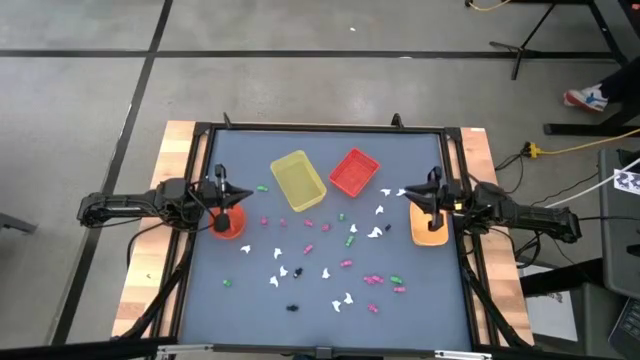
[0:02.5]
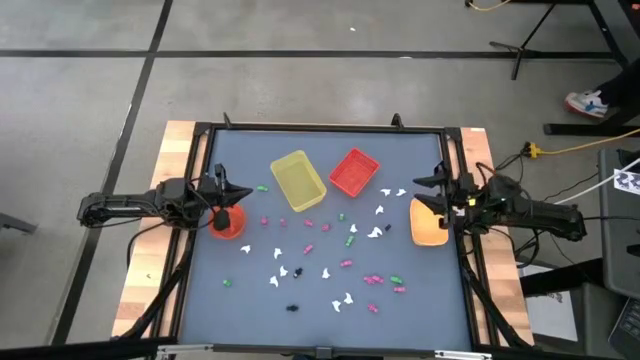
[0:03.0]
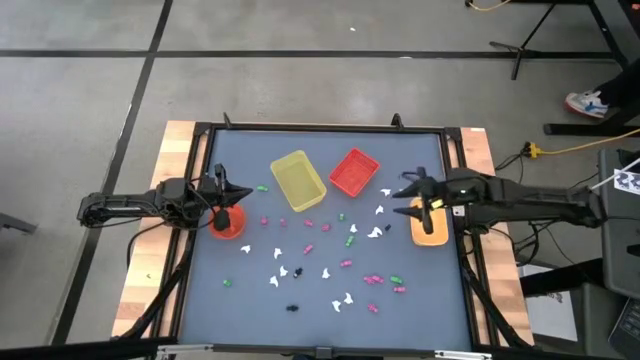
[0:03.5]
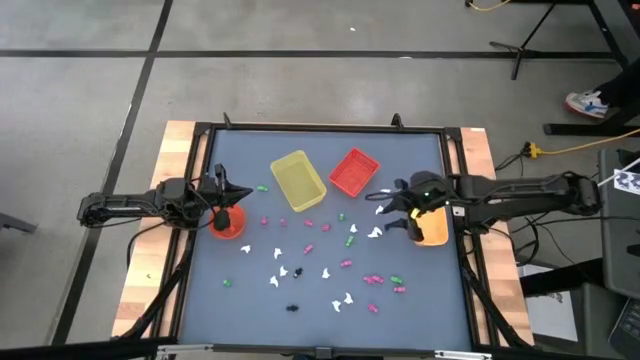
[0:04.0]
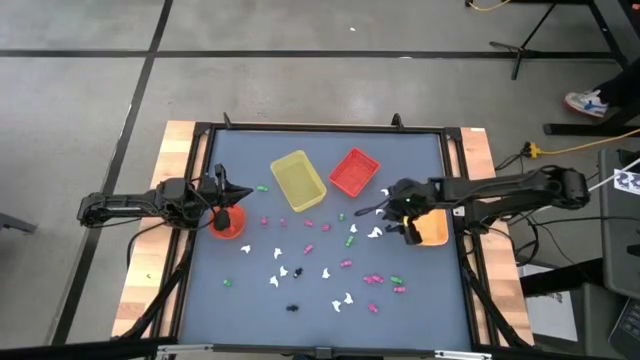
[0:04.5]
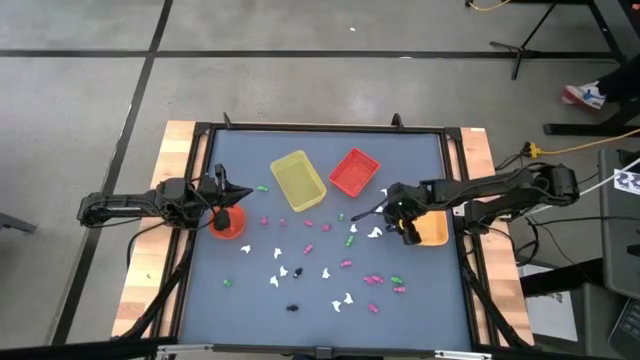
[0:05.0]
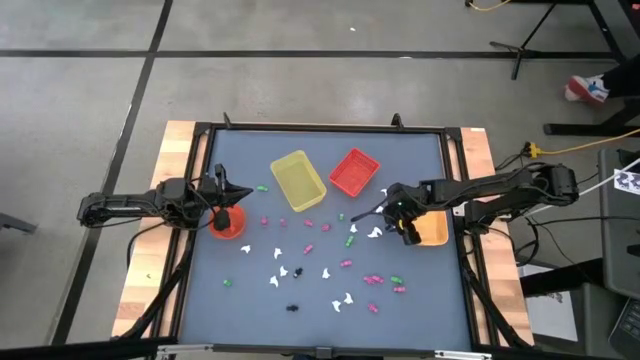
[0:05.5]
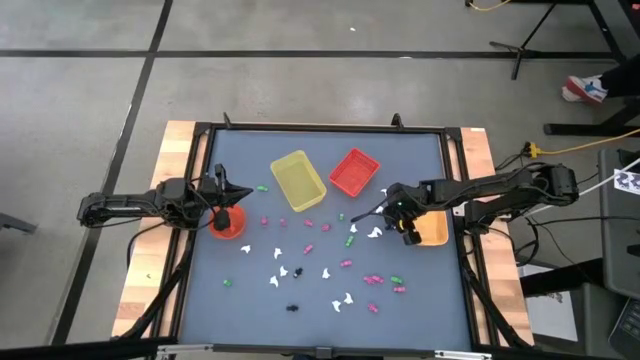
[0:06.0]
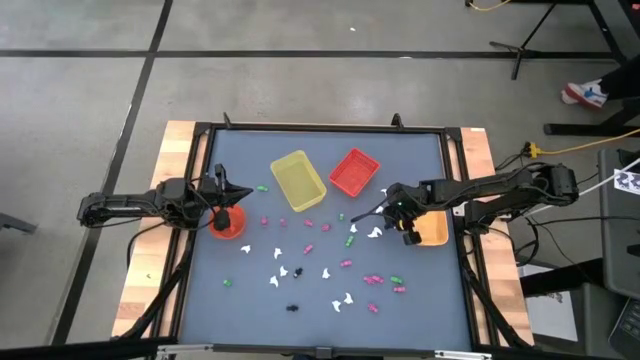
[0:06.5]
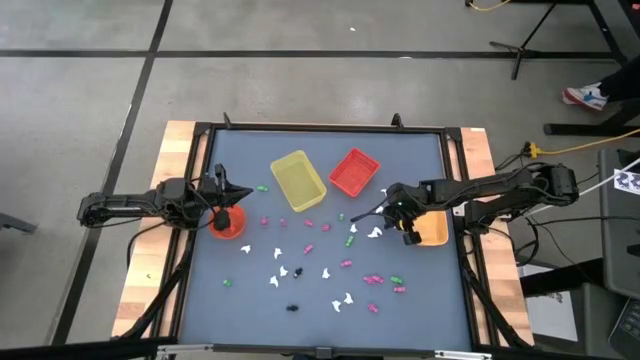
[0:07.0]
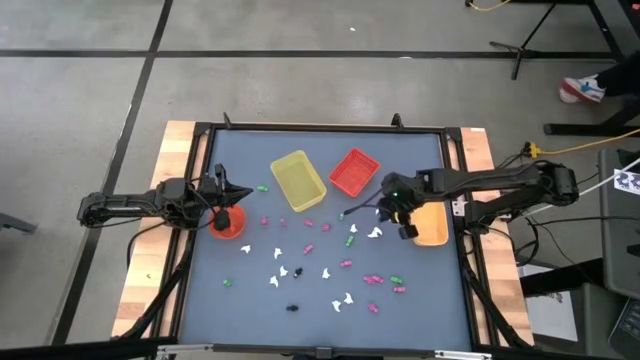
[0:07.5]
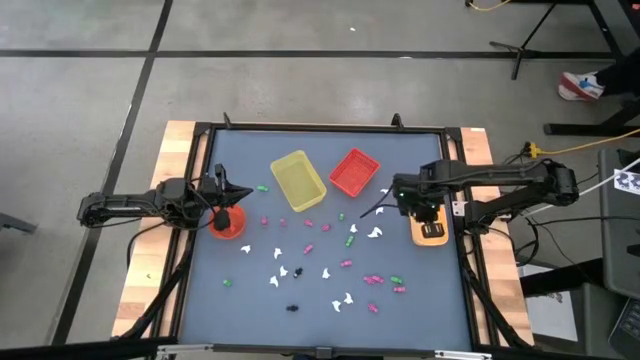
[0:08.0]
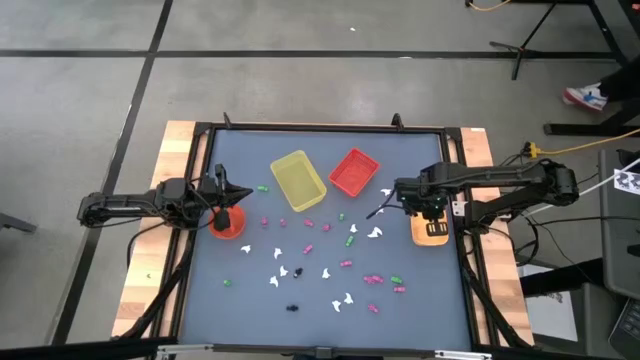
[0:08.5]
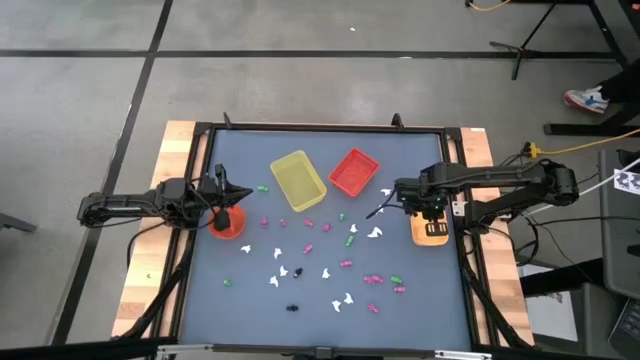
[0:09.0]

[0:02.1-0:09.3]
Task: Sort Halloween decoration
Put the black skeleton toy into the light orange bin

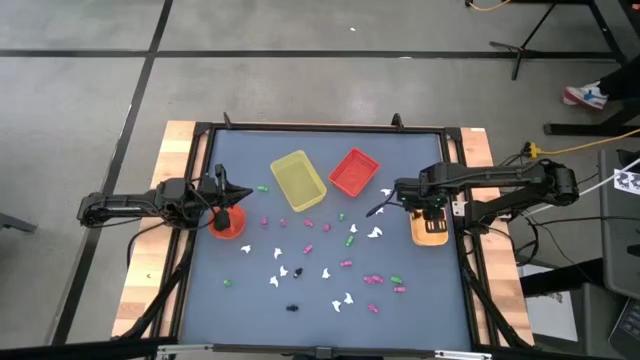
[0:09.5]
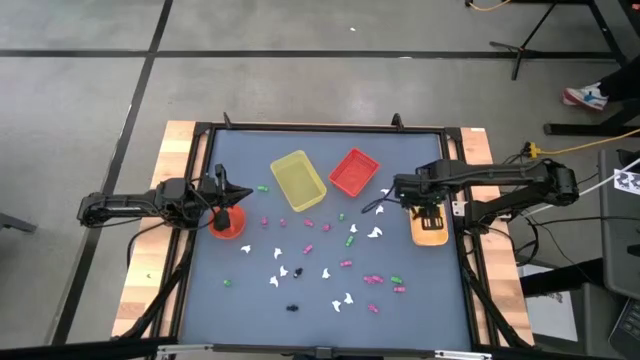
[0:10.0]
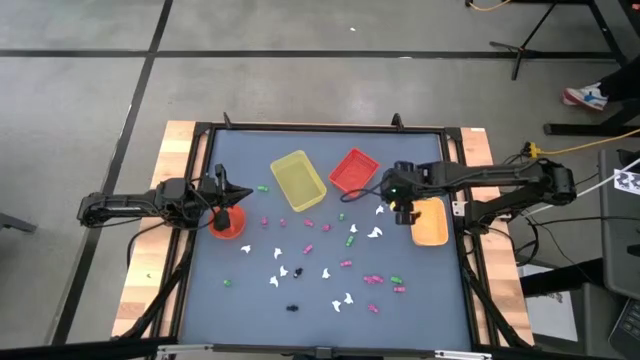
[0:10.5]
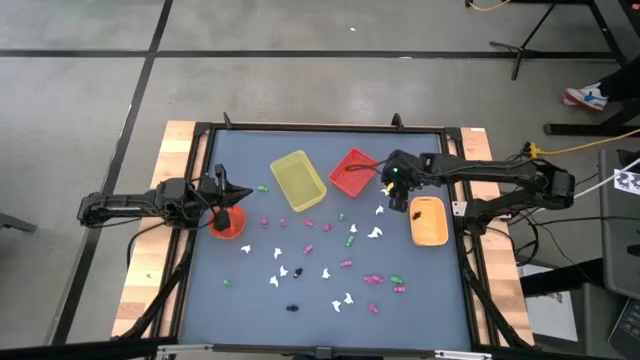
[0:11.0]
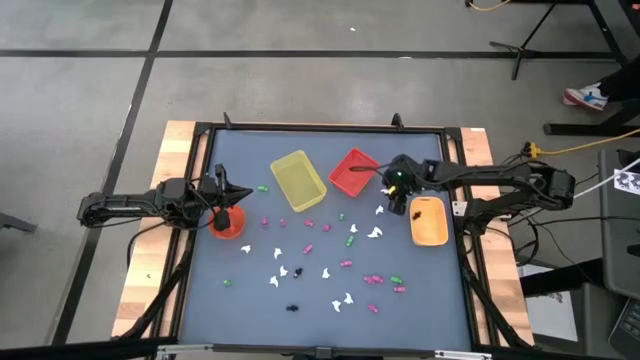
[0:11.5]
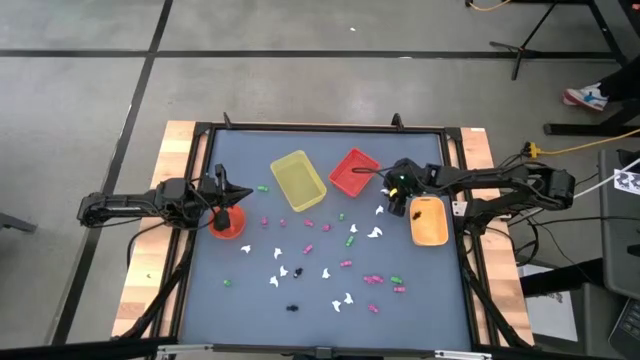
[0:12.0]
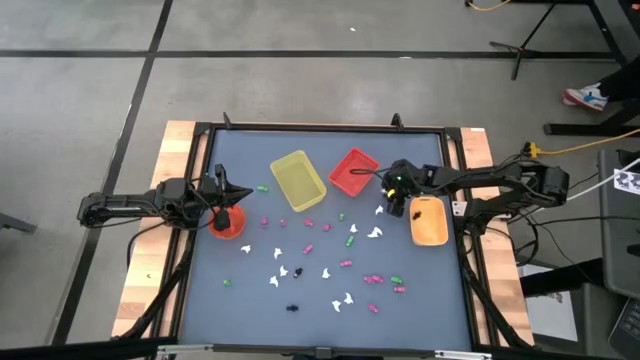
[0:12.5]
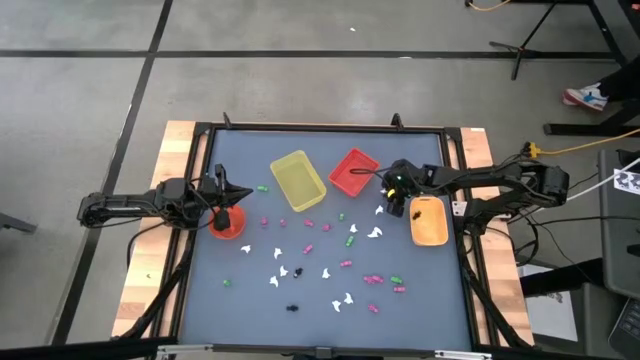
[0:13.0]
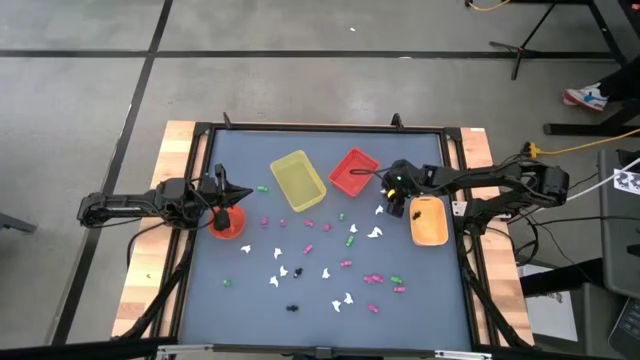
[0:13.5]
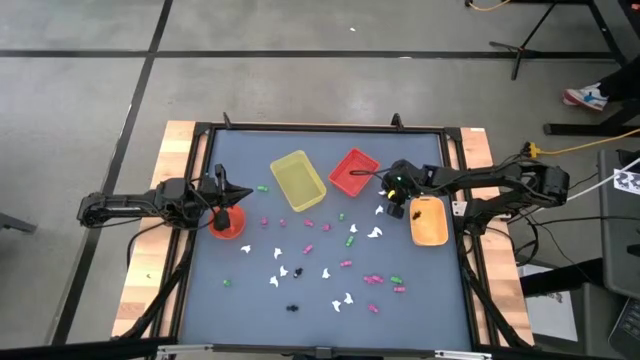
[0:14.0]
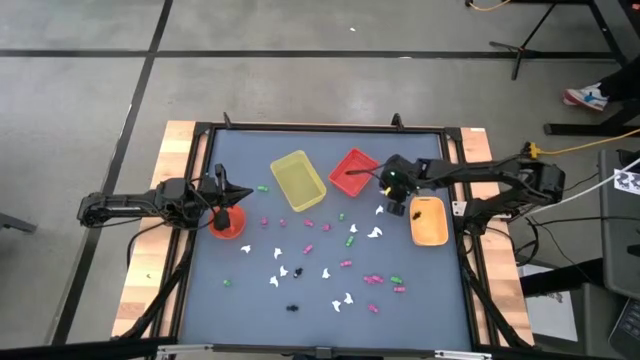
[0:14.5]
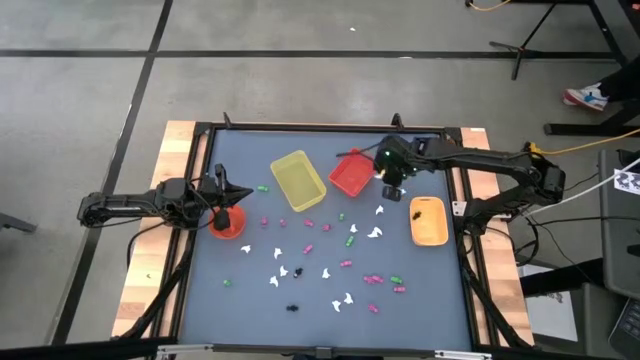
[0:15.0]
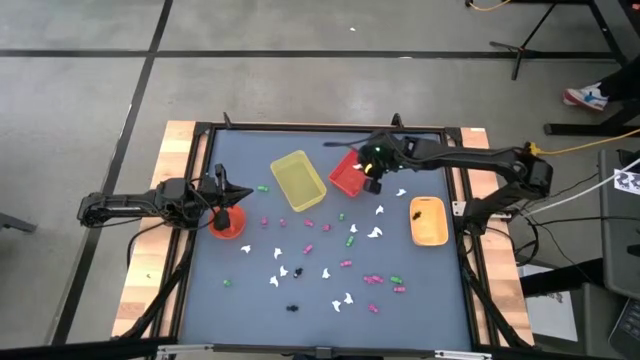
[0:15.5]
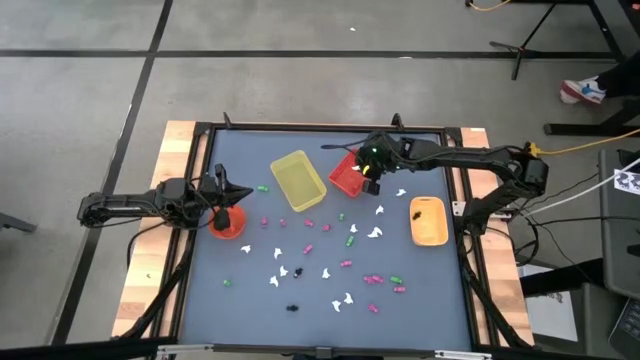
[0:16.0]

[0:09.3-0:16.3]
Put the white ghost toy into the red bin

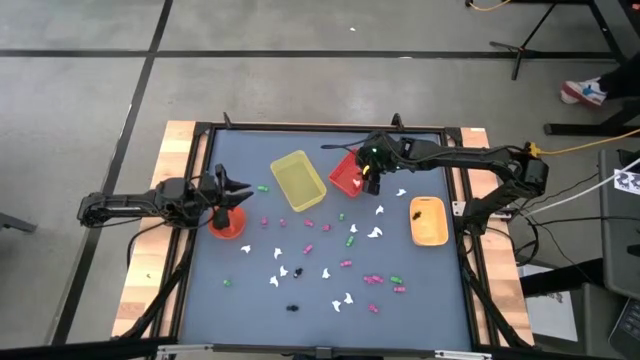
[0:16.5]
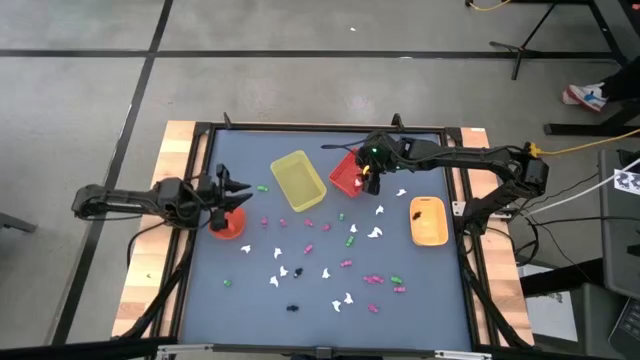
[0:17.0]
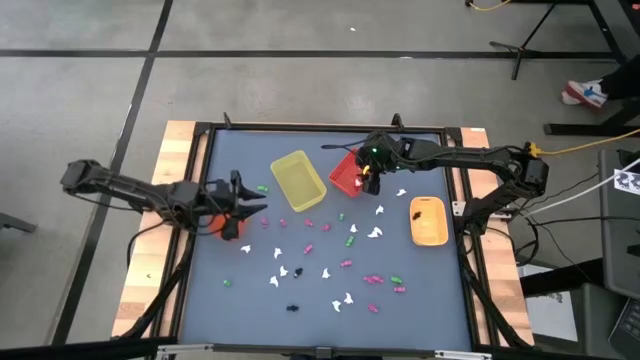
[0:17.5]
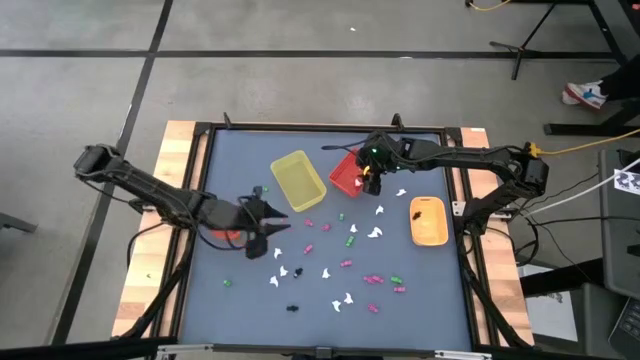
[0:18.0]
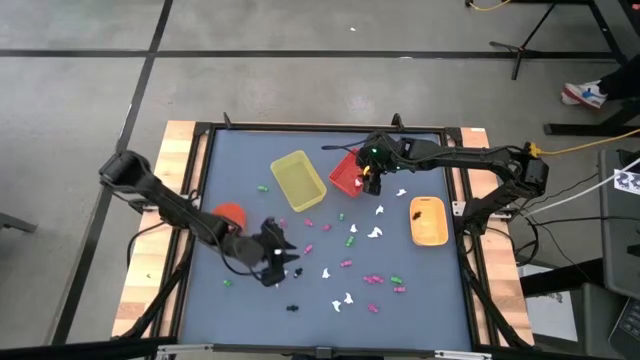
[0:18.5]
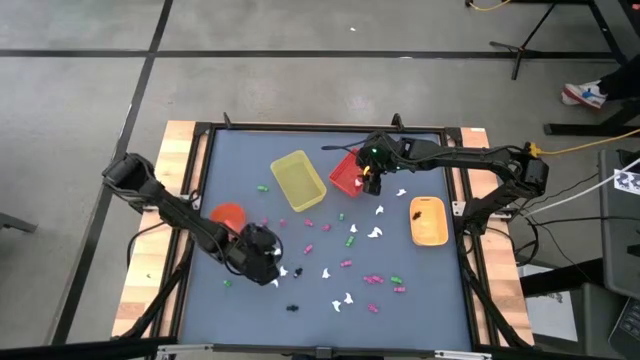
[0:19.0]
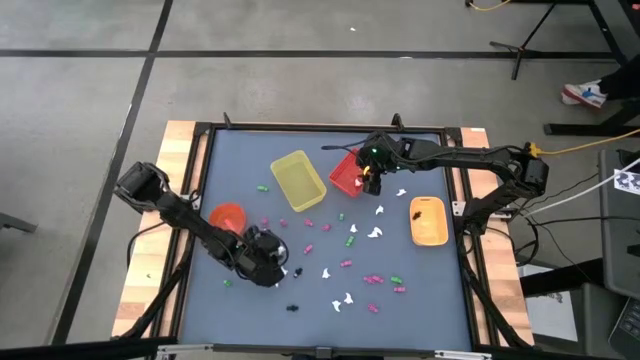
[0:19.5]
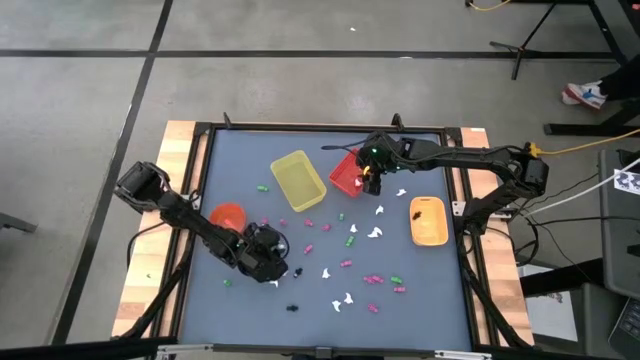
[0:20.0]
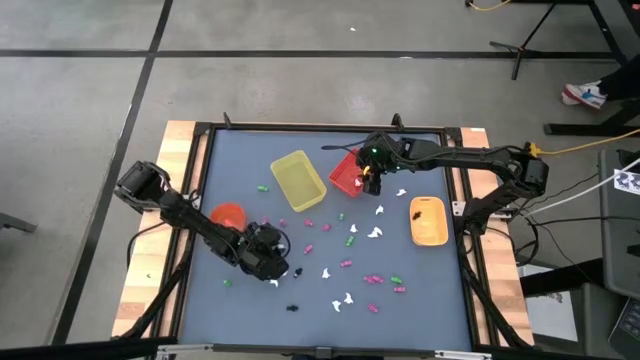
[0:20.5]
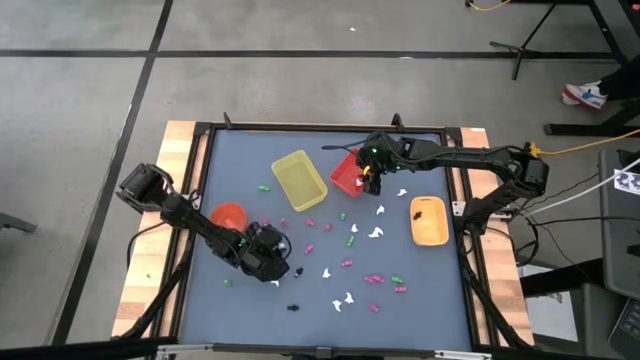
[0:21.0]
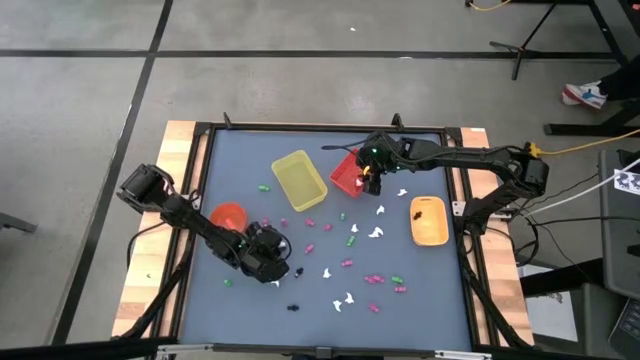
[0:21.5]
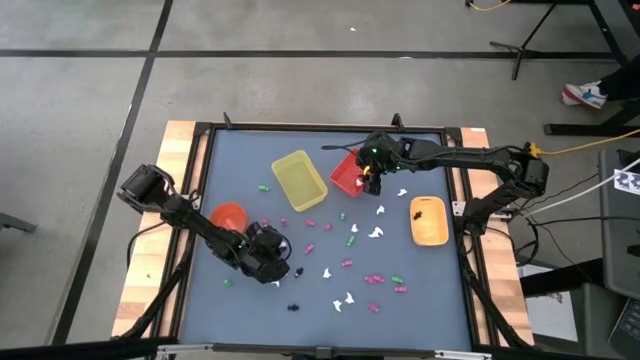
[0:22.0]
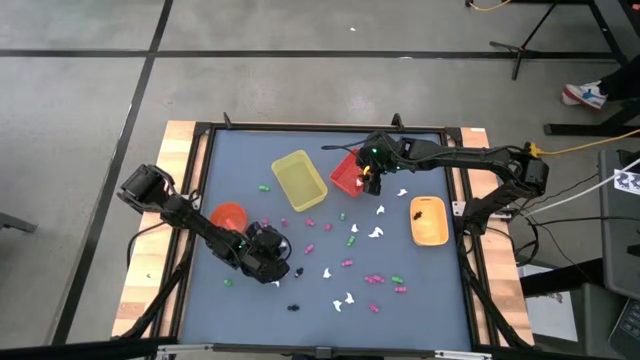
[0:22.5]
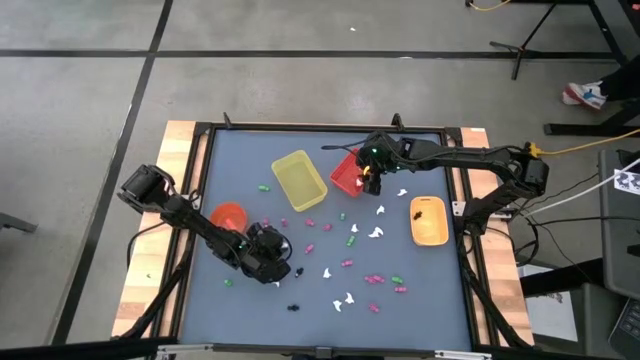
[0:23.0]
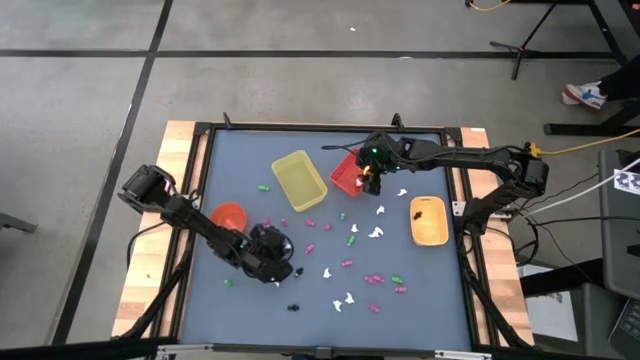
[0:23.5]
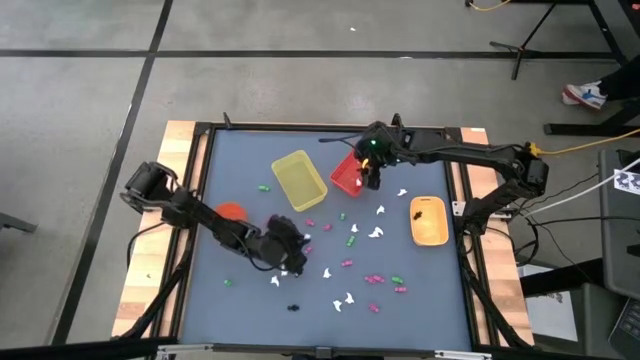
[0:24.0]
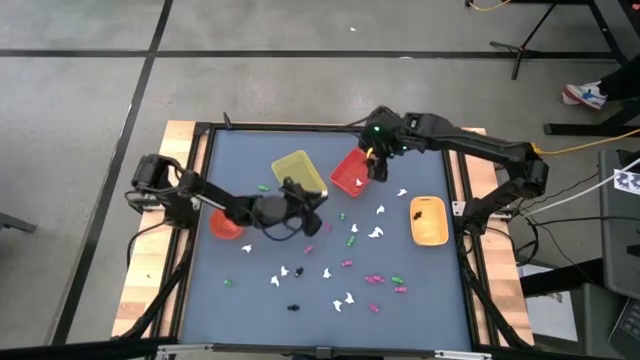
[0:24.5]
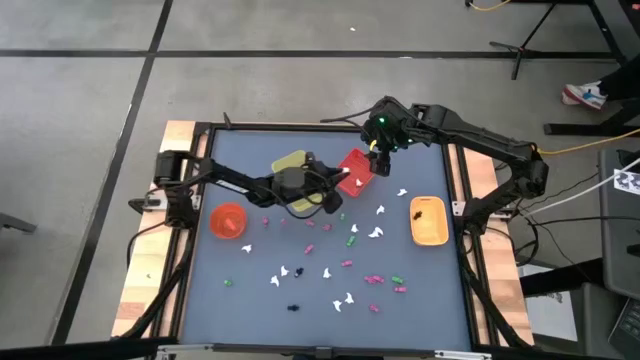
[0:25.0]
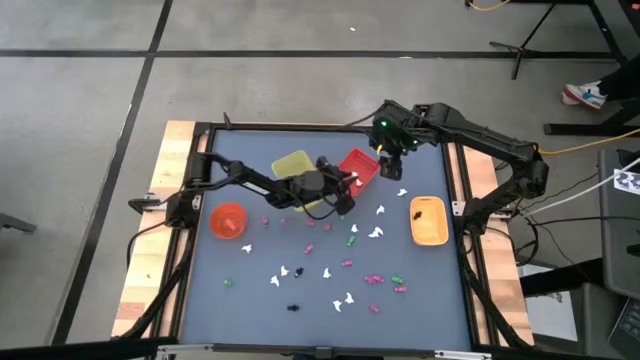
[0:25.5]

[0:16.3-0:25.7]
Put the white ghost toy into the red bin
